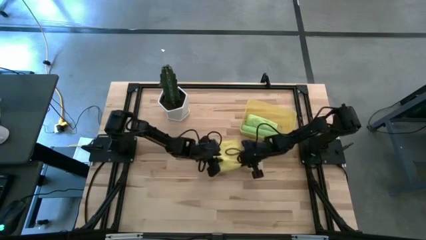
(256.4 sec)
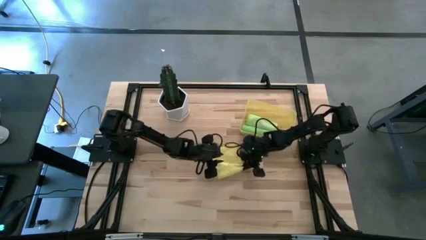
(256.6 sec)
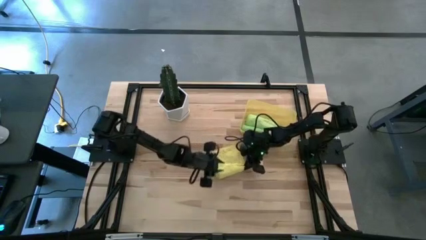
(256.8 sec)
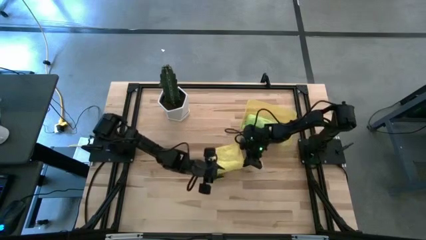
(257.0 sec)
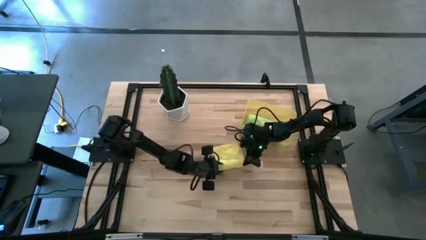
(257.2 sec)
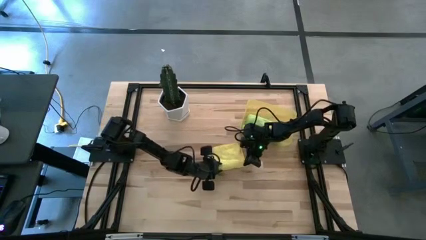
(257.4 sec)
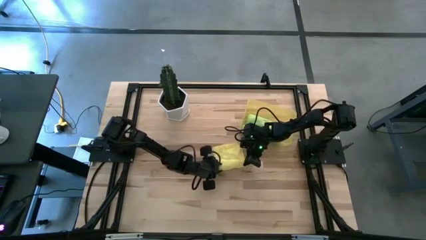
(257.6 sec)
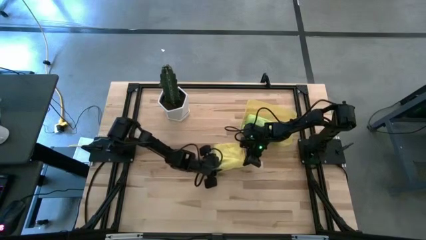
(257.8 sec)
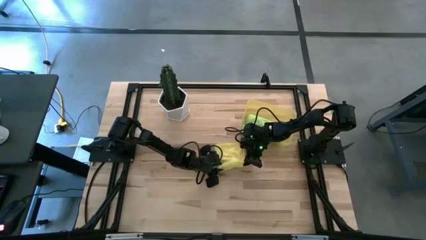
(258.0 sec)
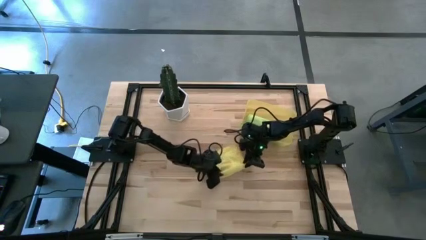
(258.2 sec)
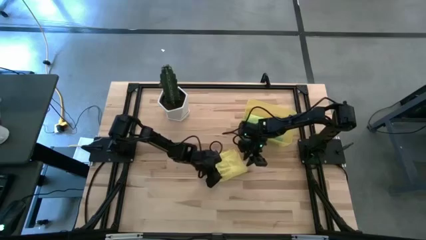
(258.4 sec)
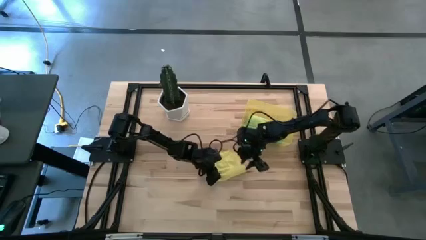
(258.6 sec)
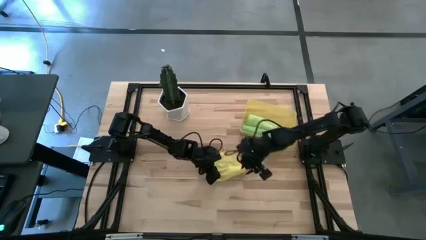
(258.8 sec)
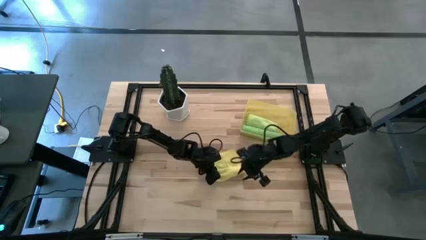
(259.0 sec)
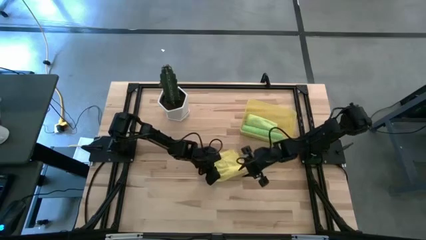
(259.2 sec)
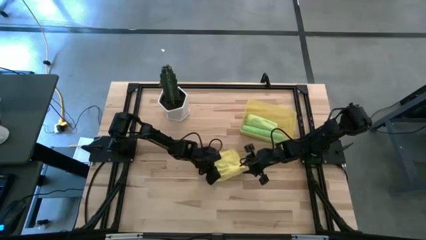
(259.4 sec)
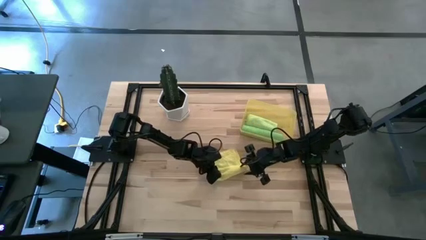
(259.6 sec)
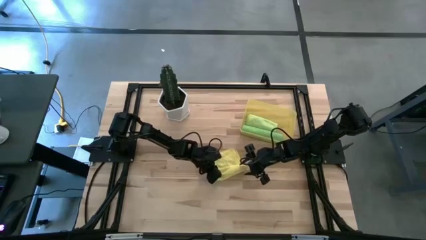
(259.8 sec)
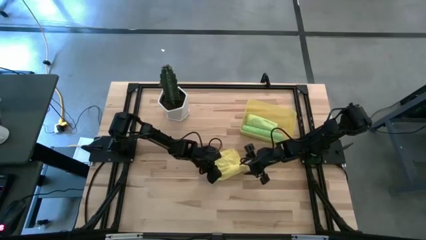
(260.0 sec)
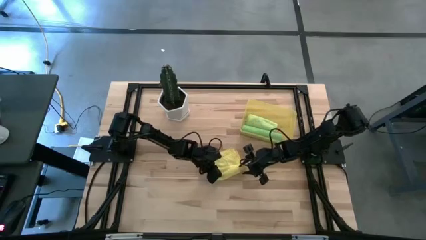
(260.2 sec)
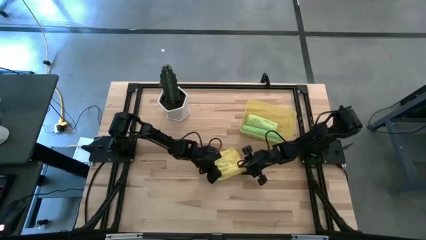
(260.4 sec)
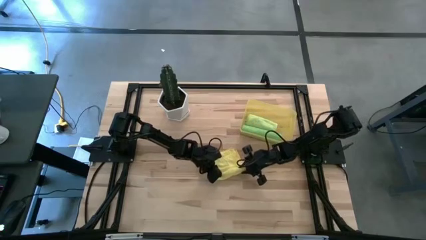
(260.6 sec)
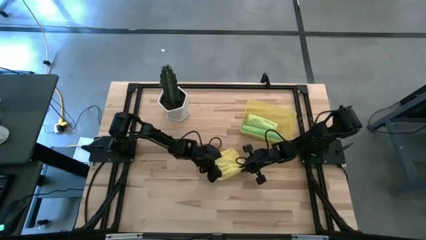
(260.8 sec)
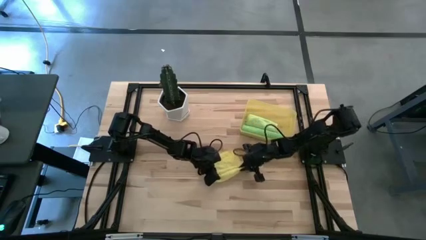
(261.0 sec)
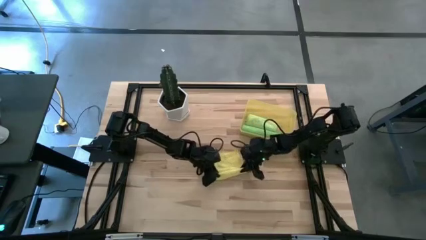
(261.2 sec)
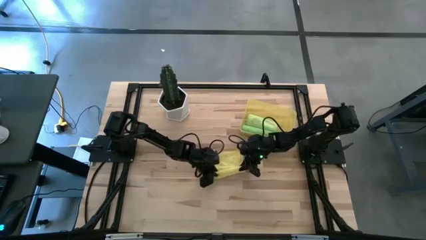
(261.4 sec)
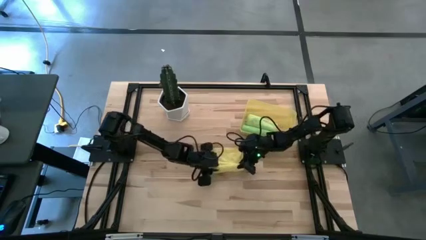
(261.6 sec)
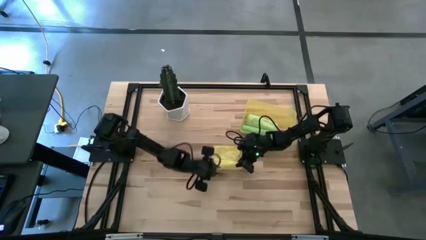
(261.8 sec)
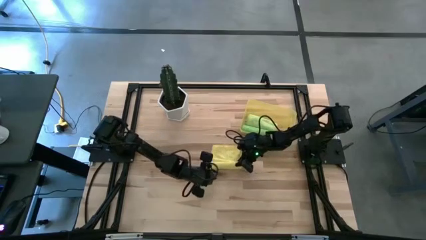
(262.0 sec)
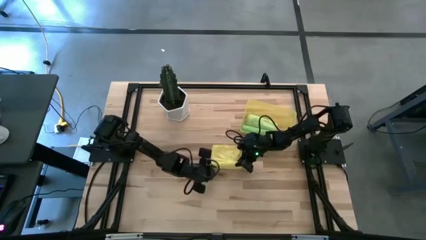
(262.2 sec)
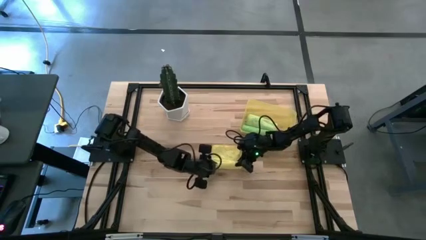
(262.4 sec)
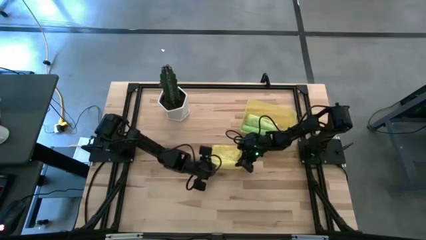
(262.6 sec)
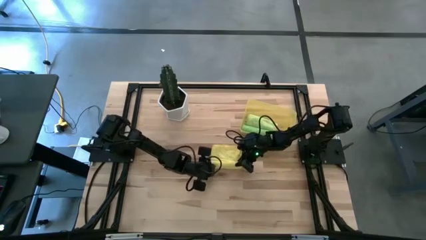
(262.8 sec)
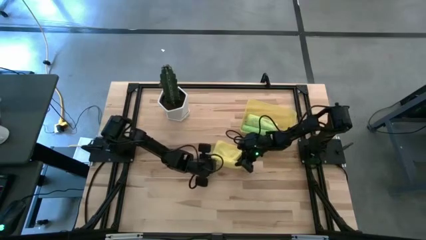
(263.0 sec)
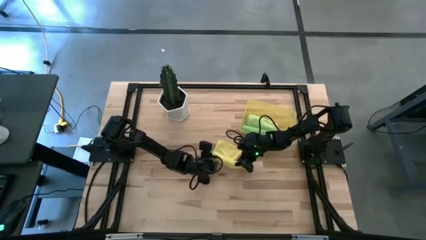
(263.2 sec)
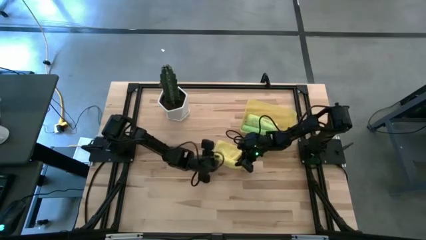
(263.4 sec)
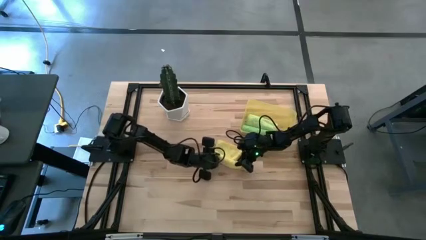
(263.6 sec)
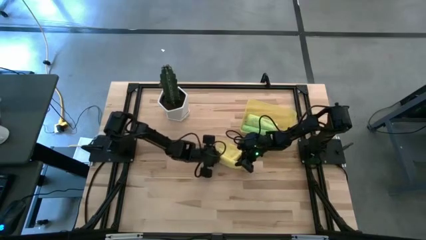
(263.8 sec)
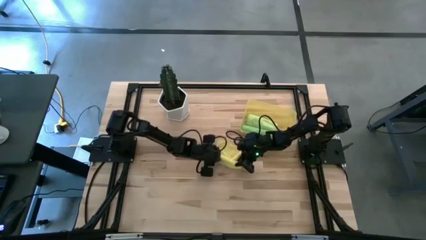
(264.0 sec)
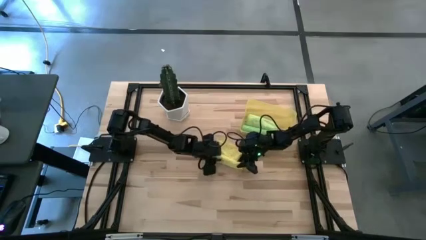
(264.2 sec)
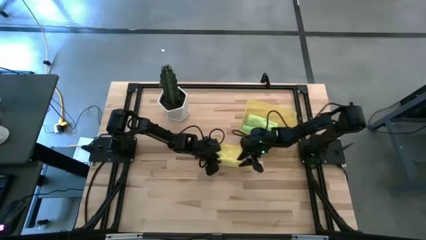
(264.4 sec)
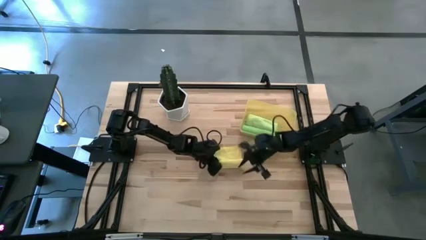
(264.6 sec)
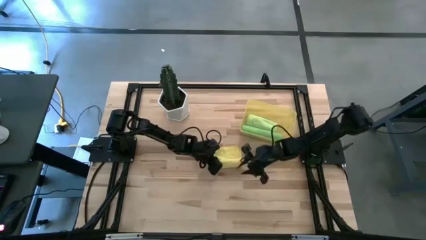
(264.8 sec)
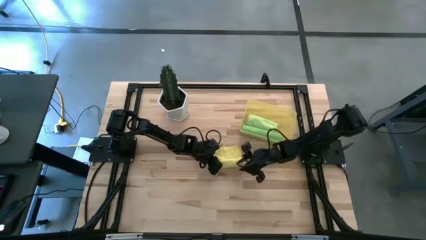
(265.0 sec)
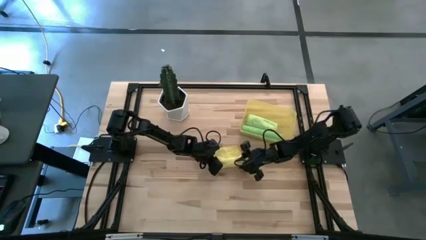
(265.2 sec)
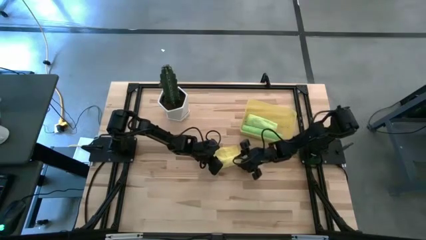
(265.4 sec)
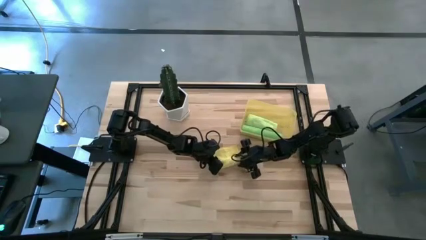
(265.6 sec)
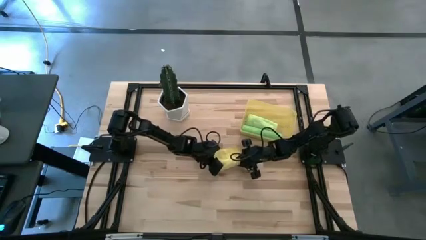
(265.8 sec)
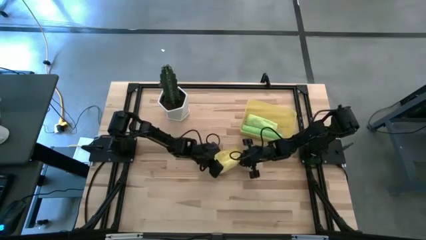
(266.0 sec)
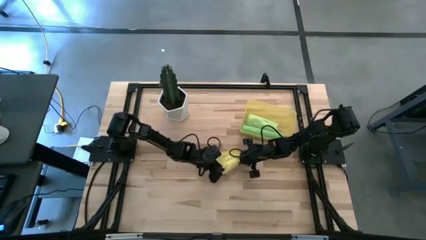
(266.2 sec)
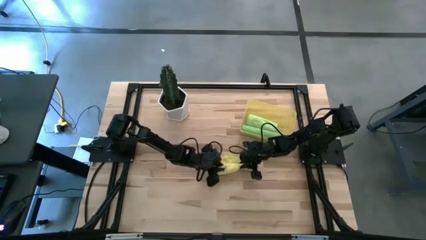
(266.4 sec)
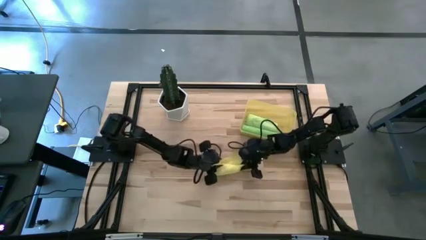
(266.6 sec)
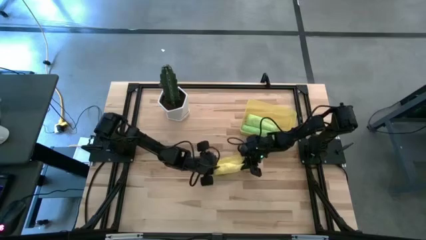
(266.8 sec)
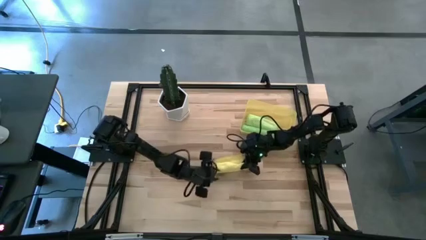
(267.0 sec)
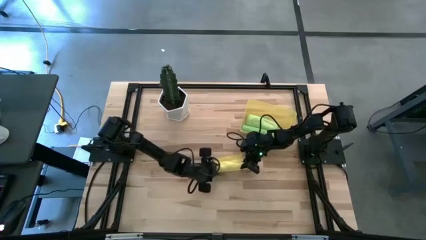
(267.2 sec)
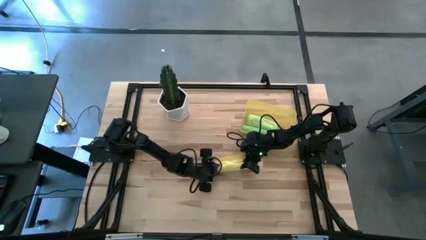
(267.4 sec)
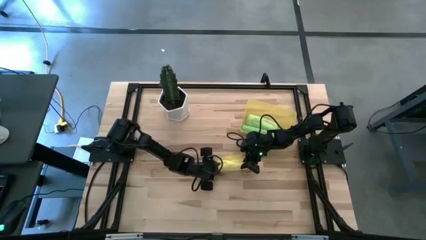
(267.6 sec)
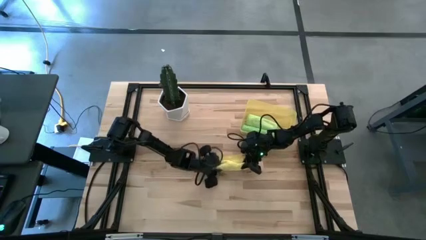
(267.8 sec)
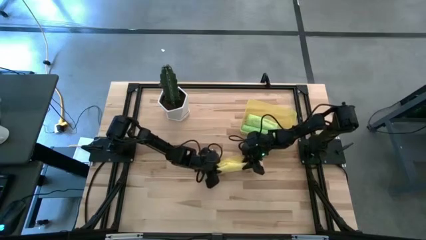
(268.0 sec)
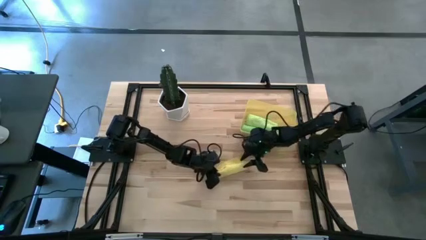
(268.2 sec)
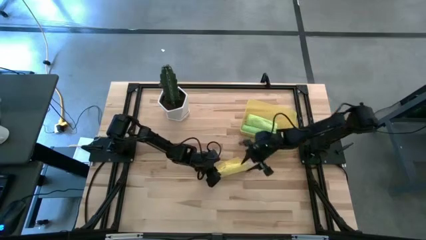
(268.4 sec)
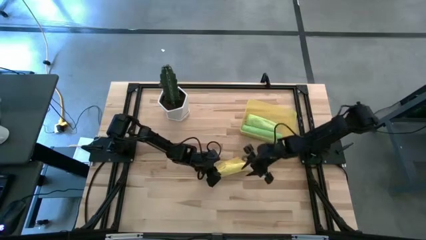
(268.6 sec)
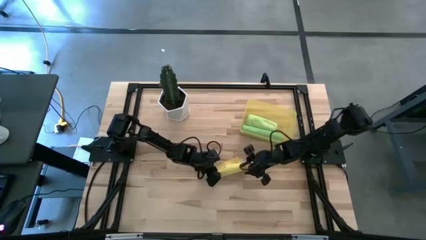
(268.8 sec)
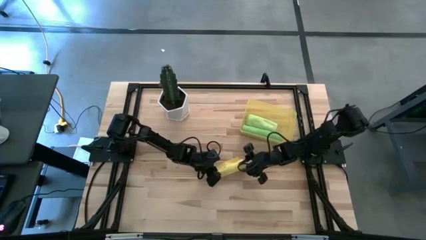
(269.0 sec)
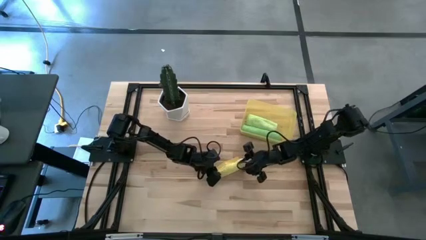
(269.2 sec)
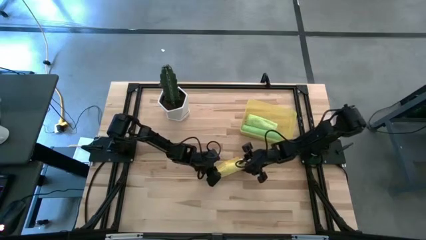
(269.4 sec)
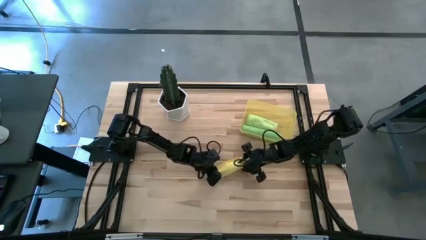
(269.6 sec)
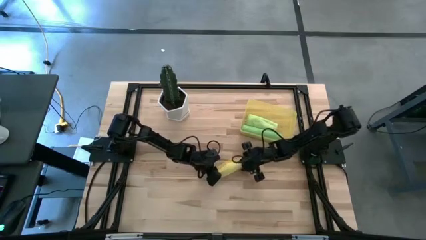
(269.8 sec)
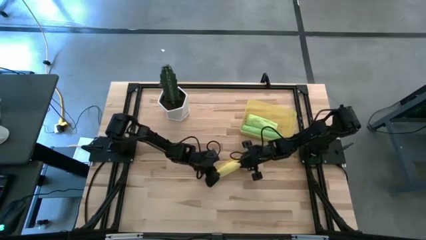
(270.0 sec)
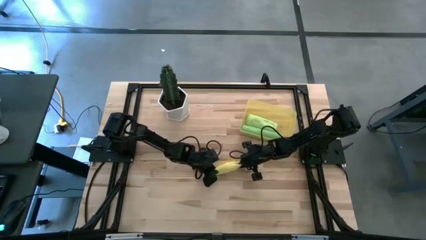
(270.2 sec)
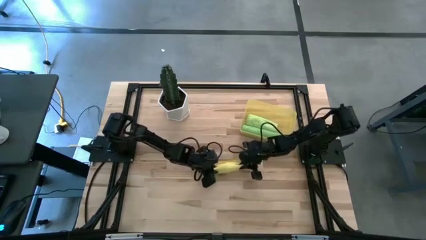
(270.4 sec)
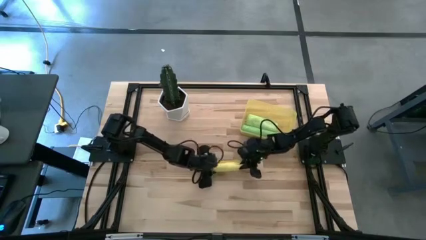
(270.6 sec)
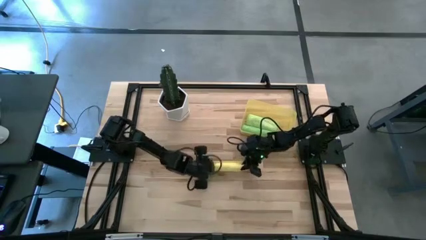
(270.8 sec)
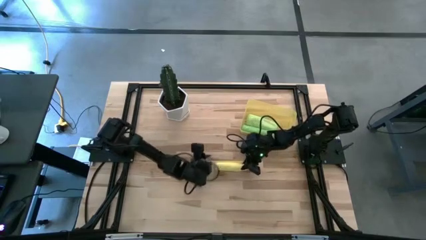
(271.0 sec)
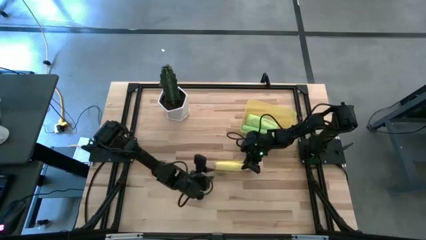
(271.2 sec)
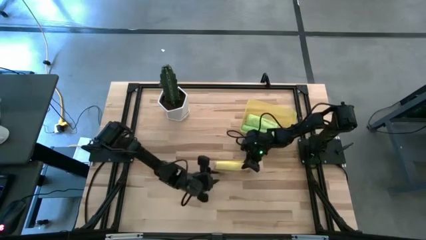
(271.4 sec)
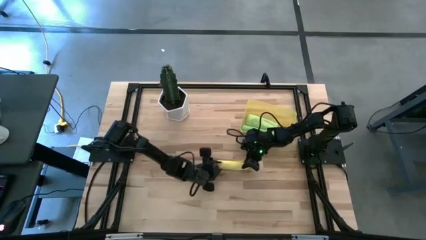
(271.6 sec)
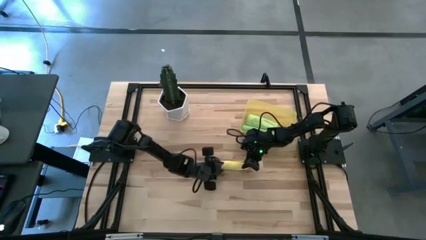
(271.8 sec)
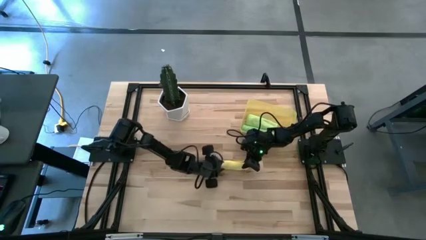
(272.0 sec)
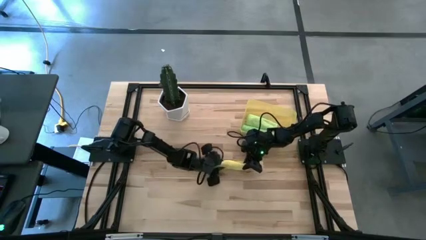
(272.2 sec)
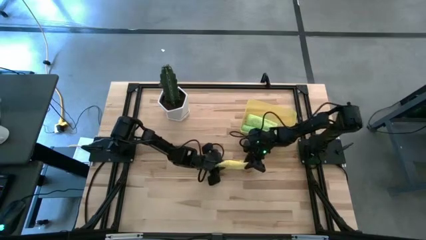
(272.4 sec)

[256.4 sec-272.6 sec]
Task: Roll microfiber towels into tight, uniform cylinder then place into a basket
Roll the yellow microfiber cloth
